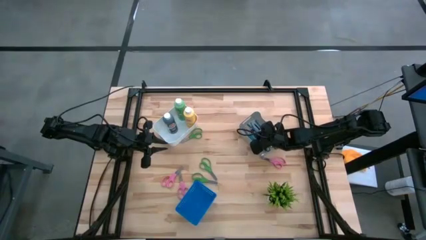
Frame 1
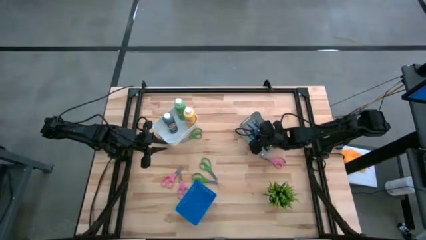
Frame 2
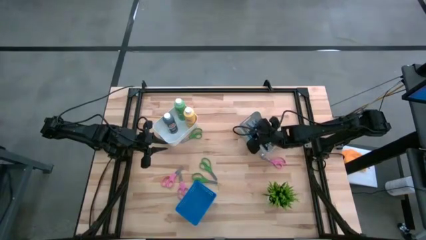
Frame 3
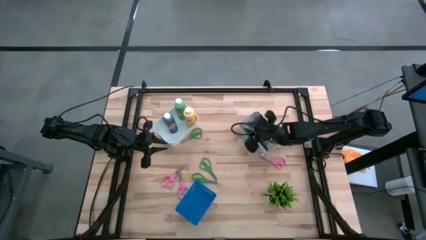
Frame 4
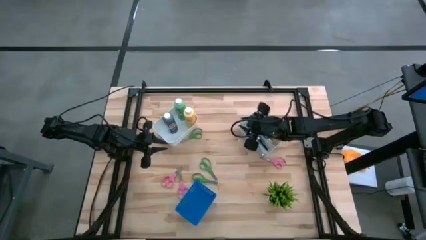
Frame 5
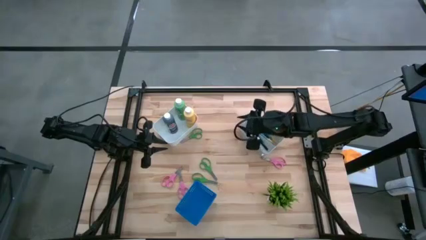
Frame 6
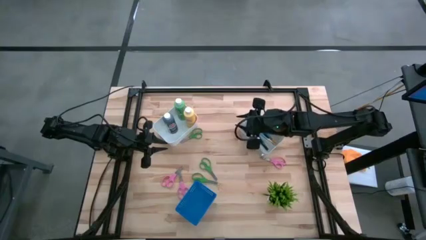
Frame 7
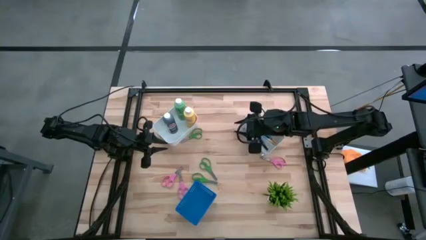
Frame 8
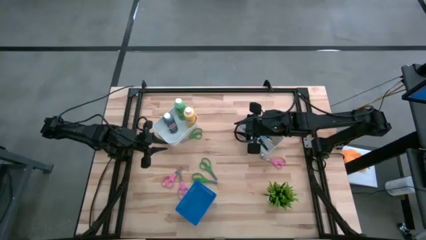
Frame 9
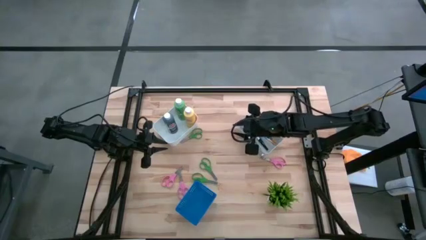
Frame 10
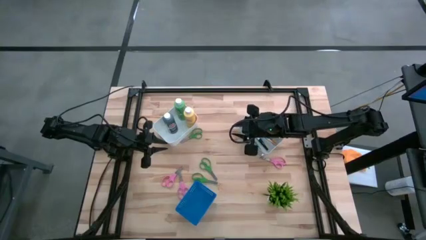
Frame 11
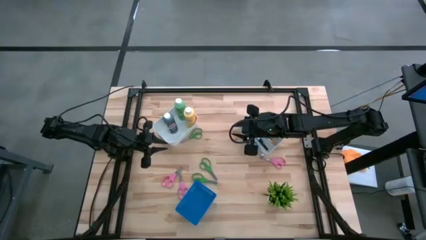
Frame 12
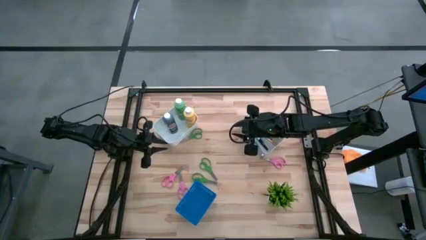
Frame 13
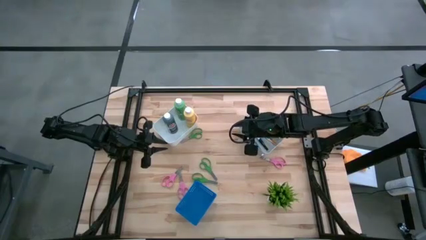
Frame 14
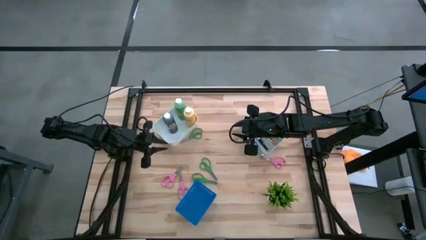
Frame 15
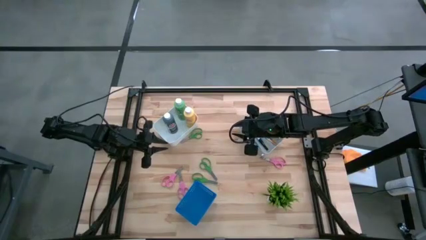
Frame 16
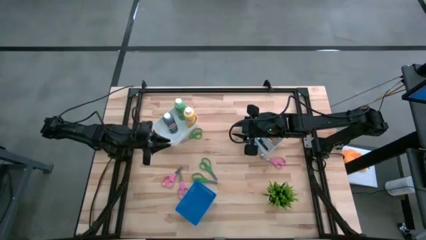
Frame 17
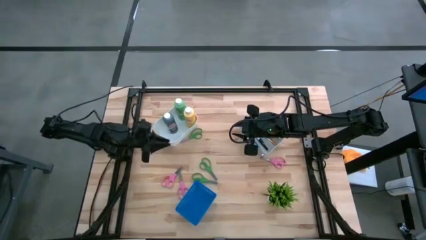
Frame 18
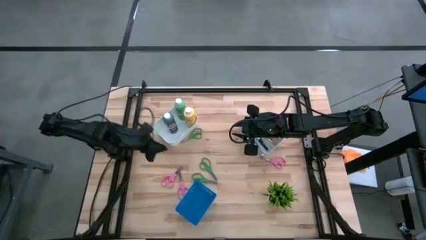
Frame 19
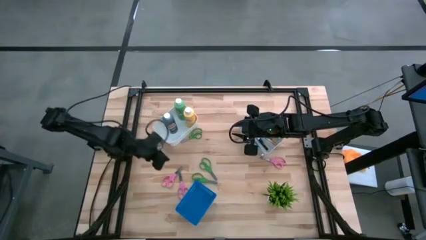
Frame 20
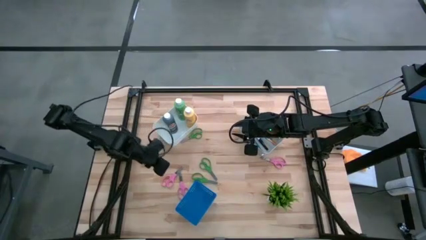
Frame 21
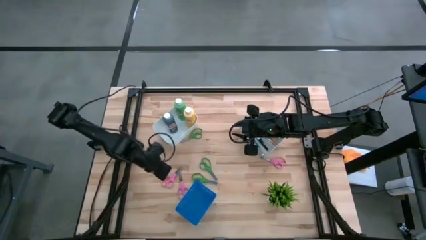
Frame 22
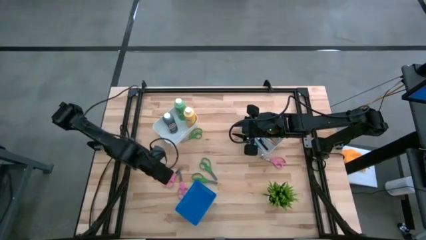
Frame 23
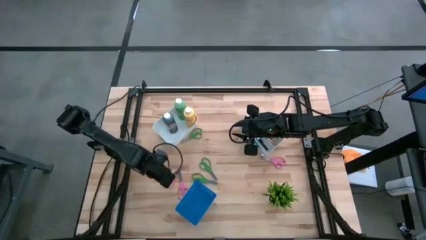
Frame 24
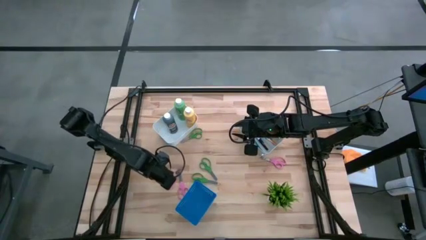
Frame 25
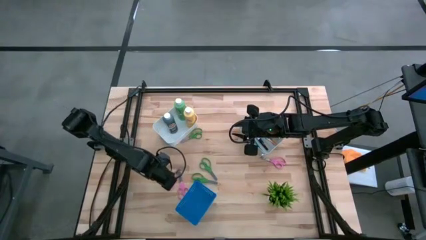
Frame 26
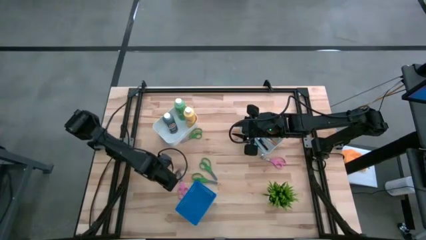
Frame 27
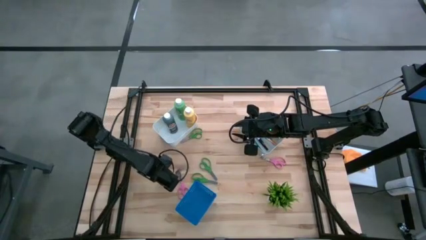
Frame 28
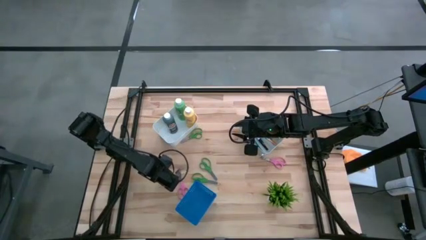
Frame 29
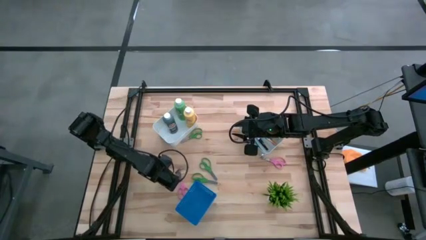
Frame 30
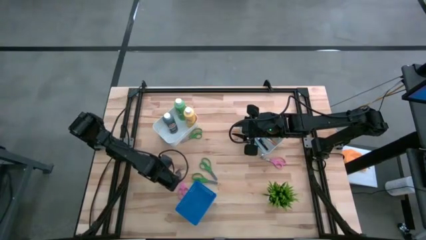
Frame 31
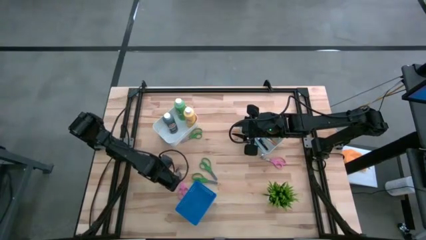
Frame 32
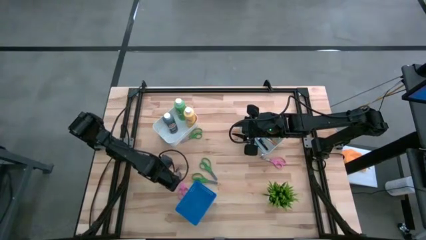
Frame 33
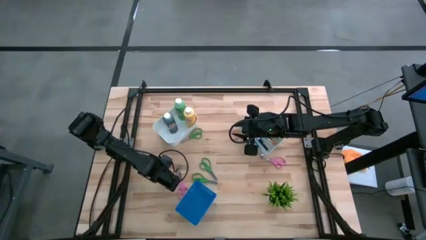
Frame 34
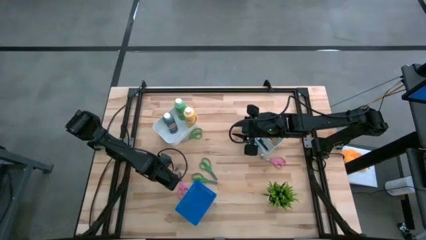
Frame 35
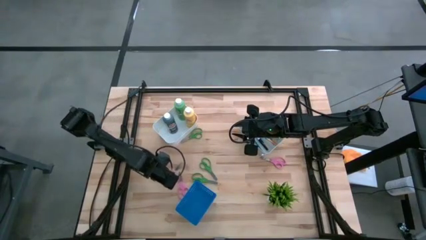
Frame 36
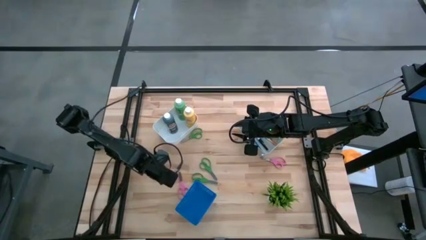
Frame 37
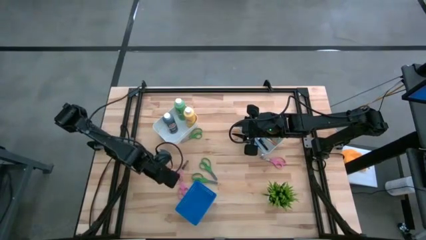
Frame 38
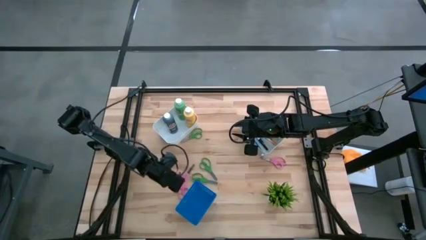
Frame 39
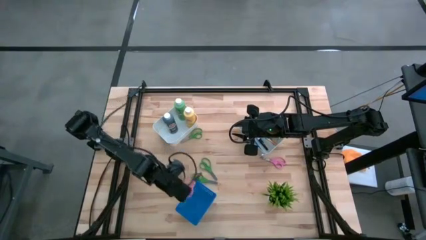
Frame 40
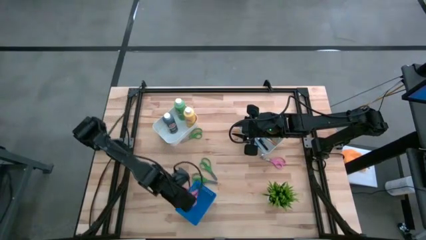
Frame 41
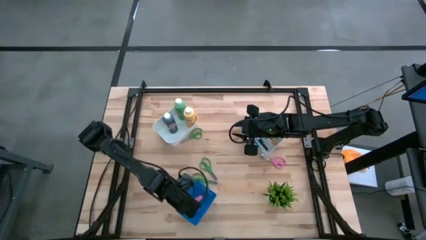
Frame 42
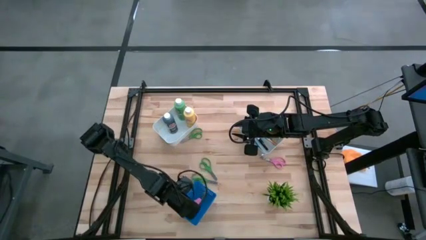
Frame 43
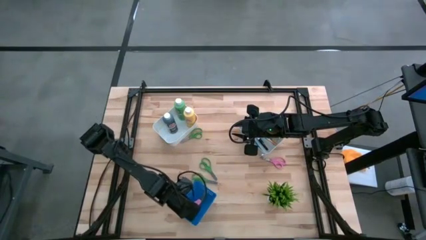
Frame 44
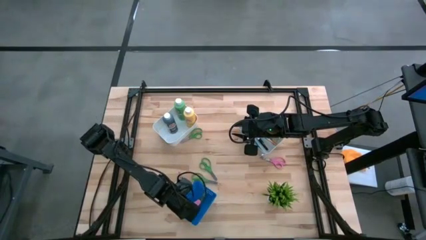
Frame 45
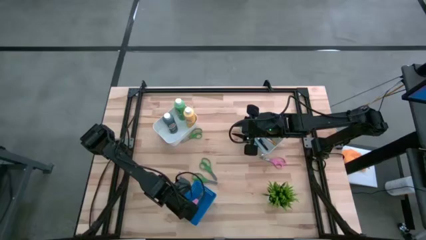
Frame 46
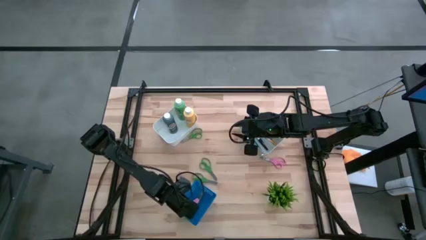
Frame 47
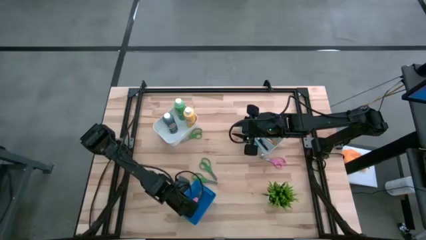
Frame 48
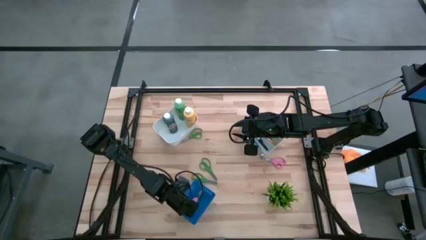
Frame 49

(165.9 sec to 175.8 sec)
Task: Pick & Place Paint Supplies
Put the pink scissors into the blue bin

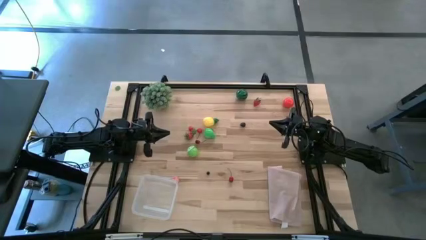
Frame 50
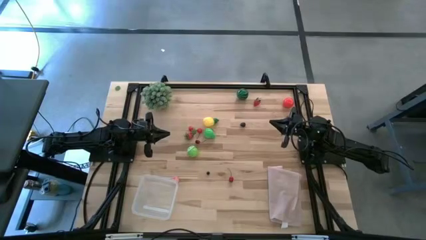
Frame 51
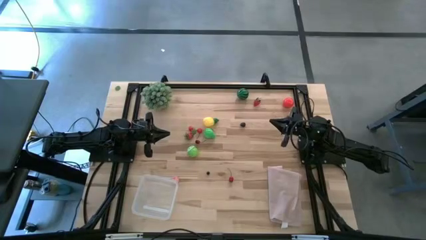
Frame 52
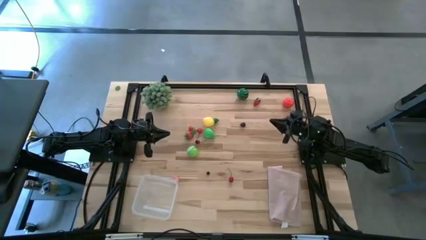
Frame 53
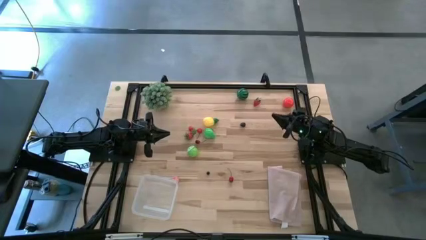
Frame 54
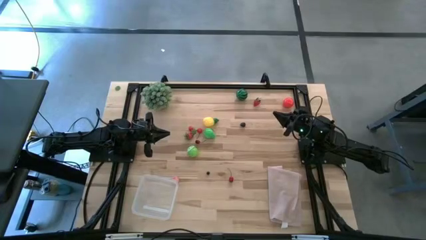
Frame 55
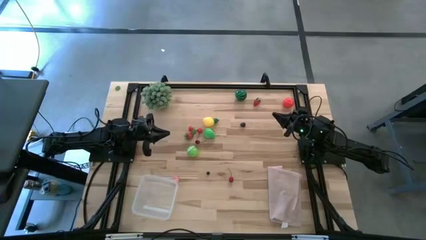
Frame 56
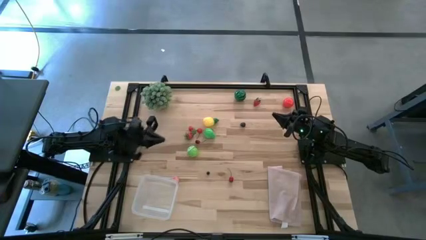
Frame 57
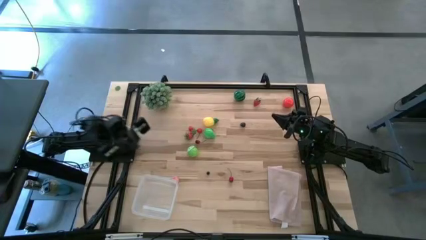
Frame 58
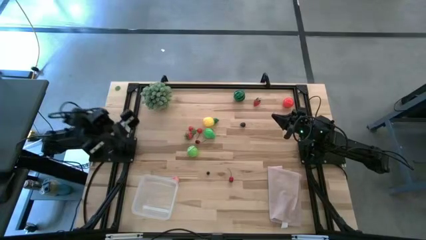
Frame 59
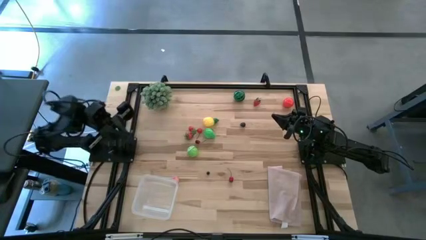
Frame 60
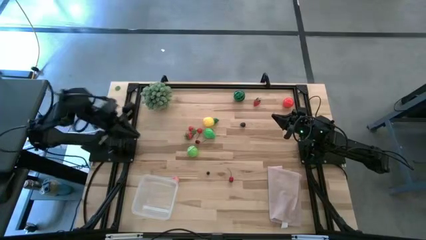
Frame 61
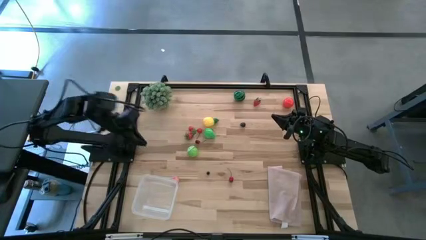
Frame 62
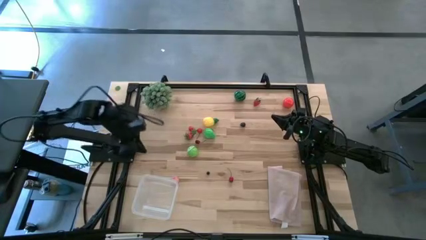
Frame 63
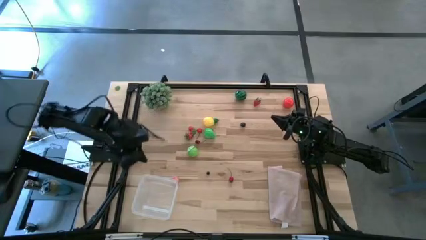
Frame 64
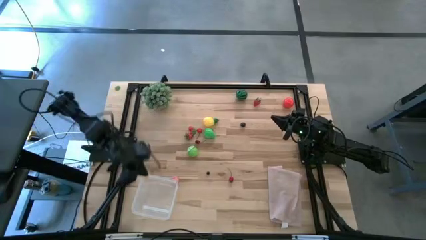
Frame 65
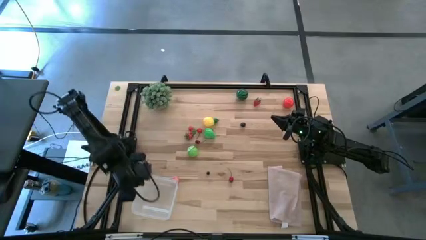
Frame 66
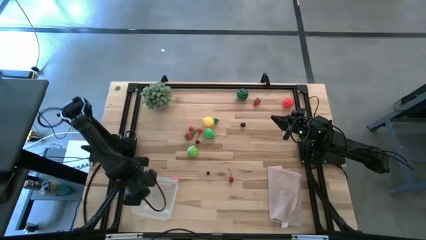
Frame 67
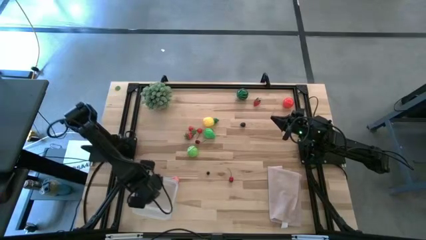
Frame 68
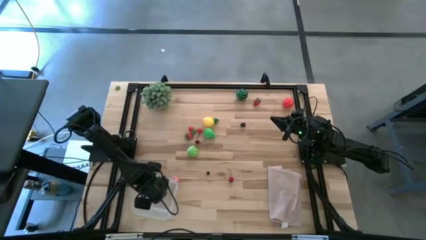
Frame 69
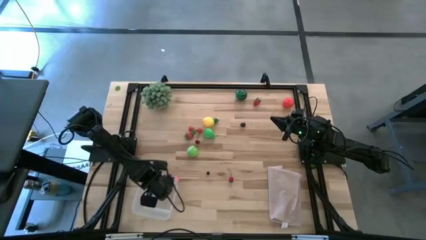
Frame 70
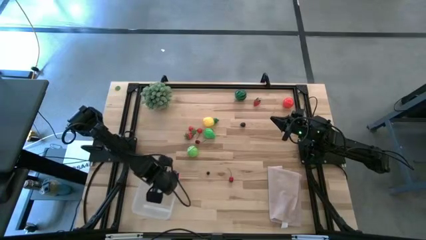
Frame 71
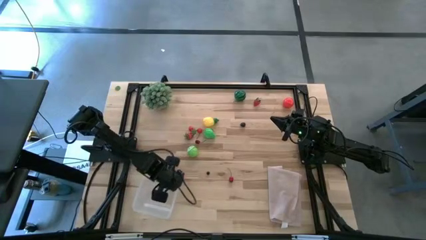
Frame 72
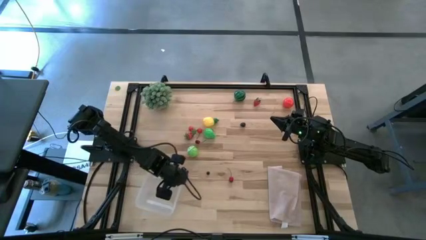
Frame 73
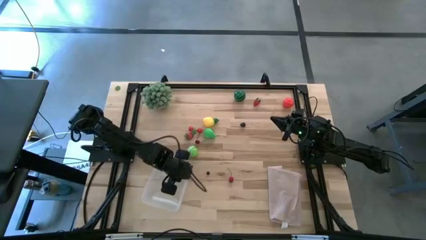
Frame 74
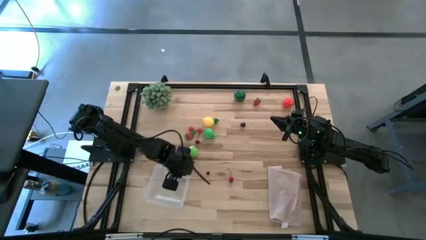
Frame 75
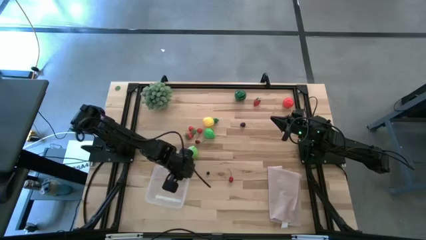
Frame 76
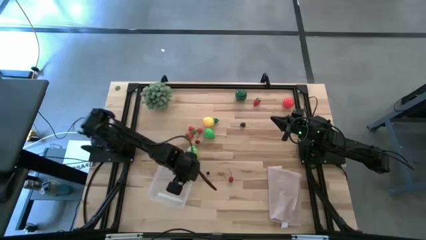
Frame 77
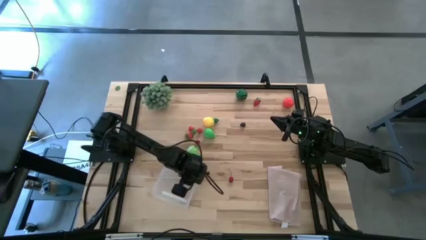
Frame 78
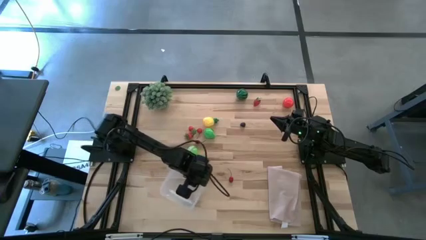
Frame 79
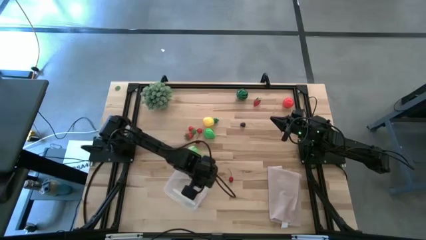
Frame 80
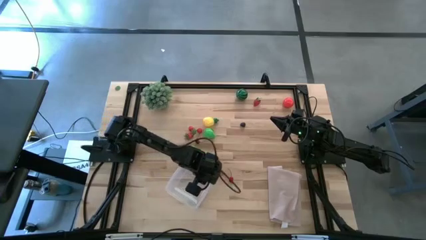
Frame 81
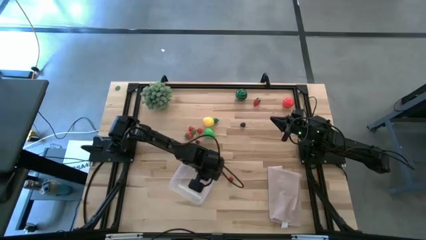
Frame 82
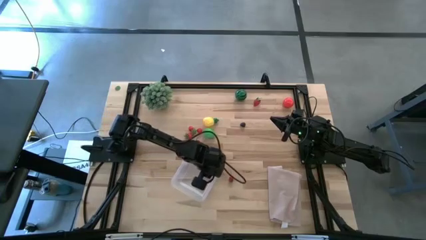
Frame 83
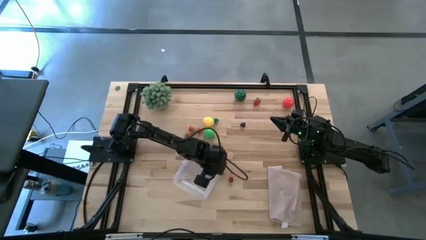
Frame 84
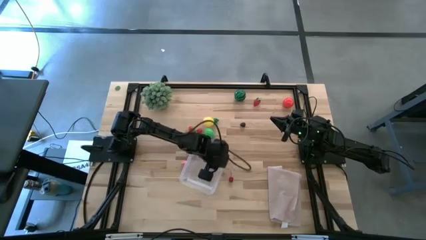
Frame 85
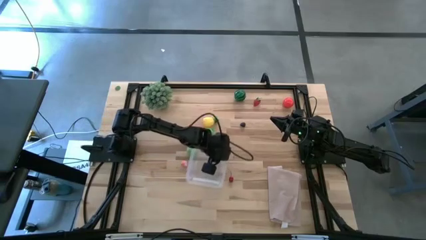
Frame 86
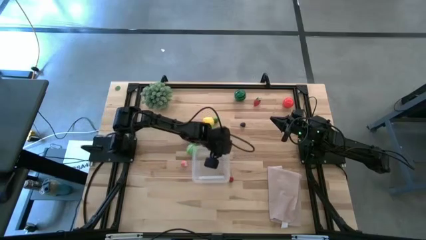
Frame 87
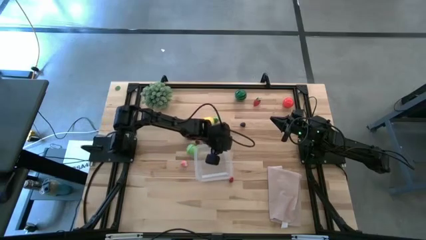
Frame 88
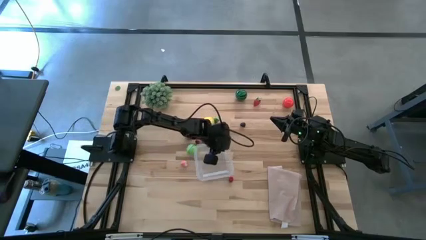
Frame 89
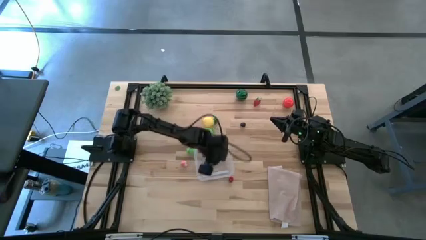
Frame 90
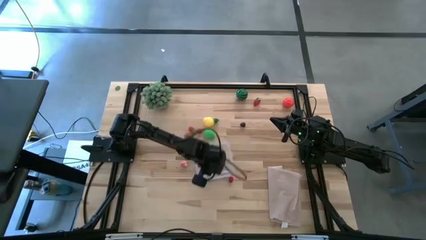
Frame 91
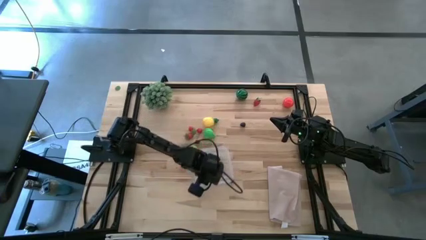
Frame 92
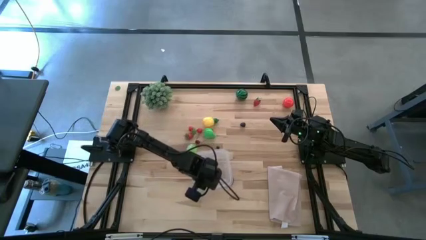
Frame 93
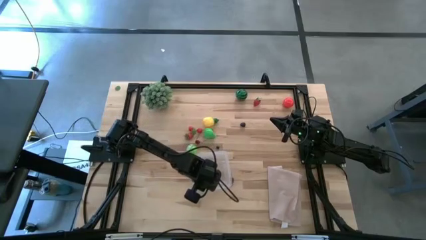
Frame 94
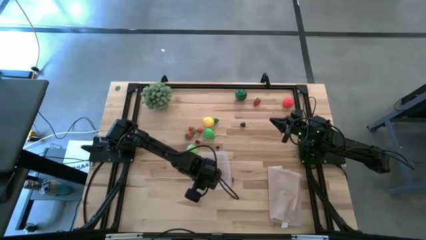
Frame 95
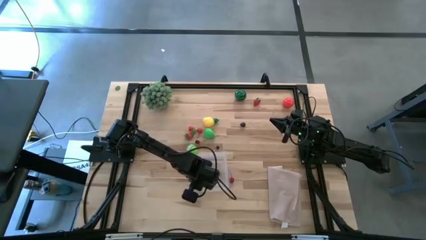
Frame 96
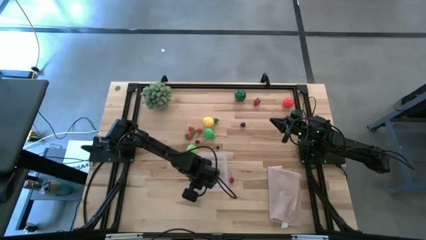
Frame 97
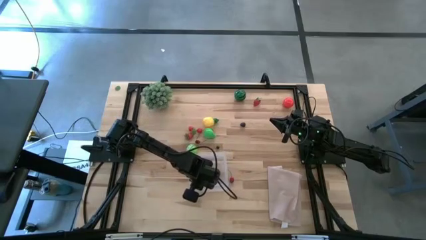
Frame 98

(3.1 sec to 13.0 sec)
Task: Pick and placing Produce into tupperware
Prepare the transparent bin in the center of the table
